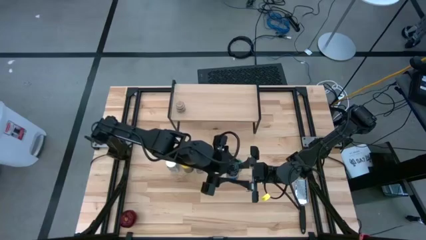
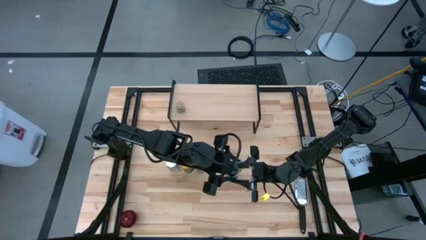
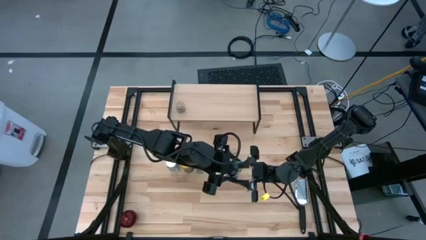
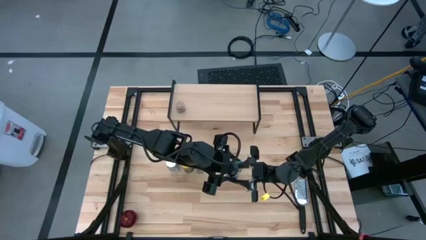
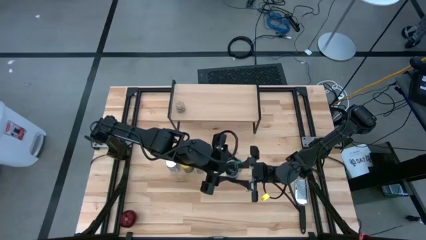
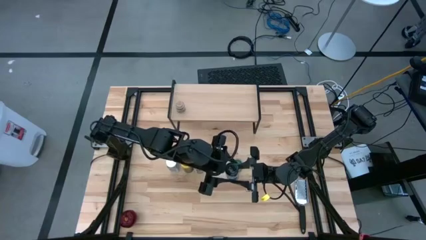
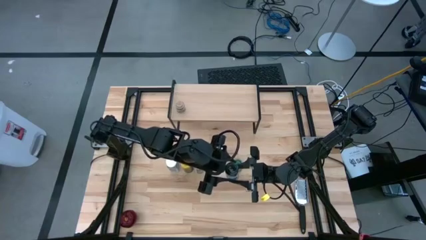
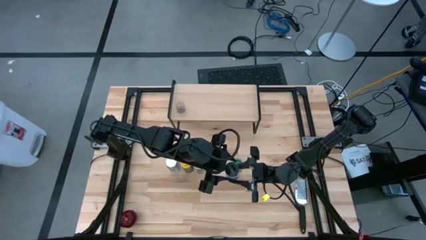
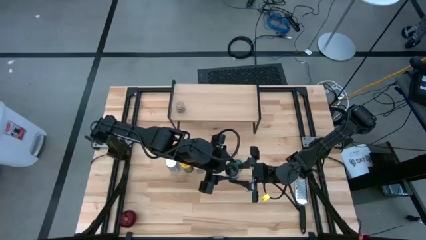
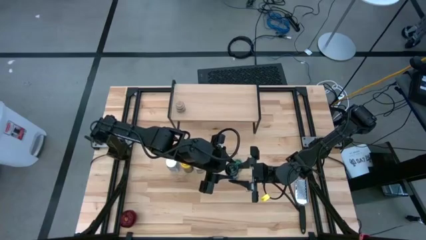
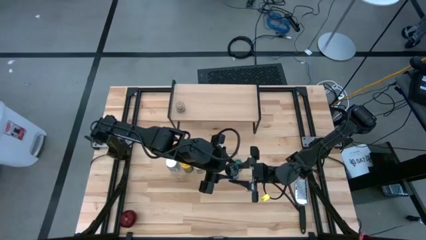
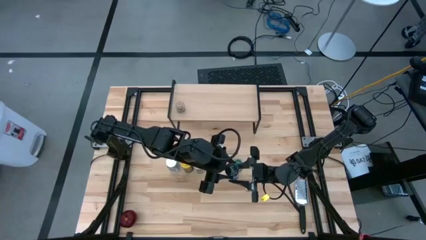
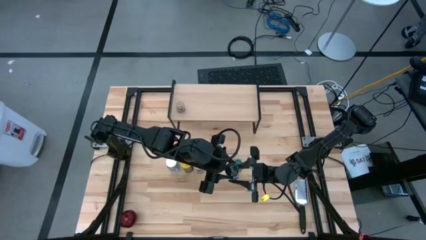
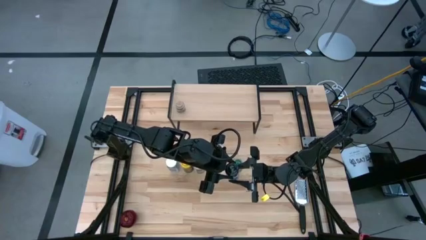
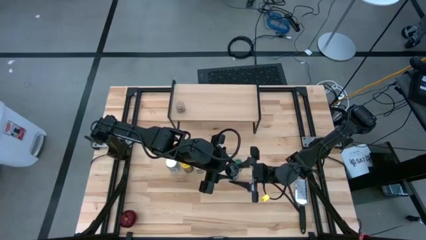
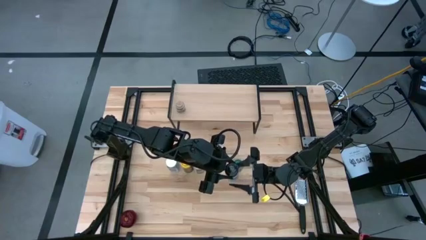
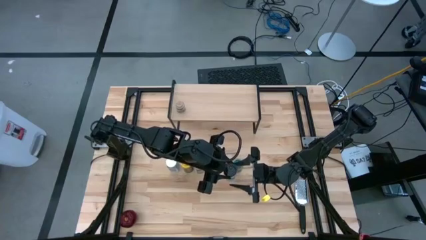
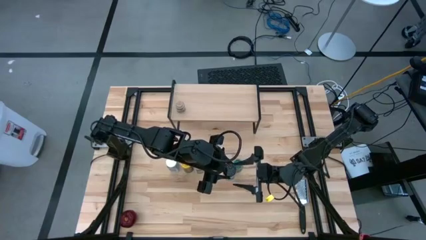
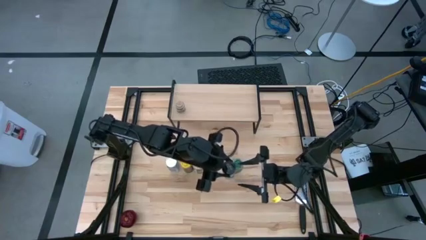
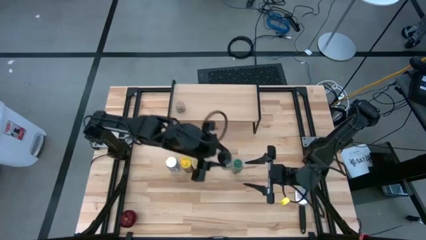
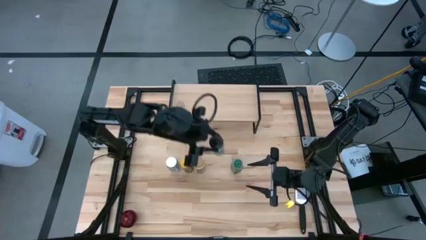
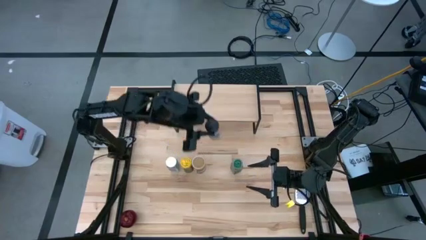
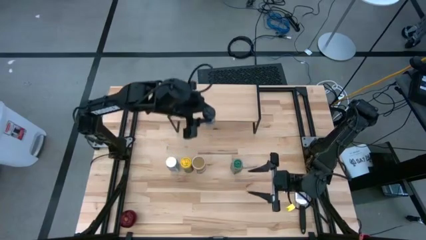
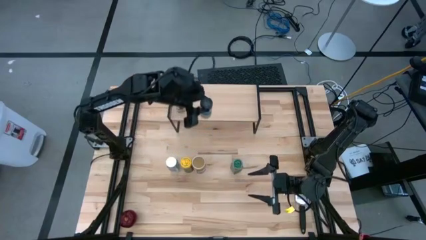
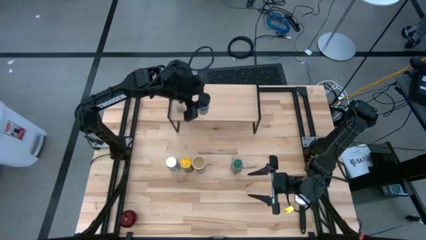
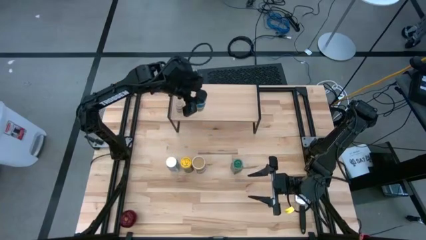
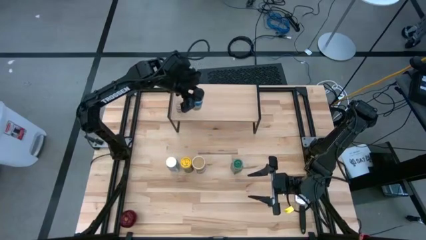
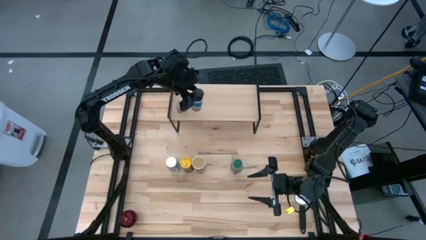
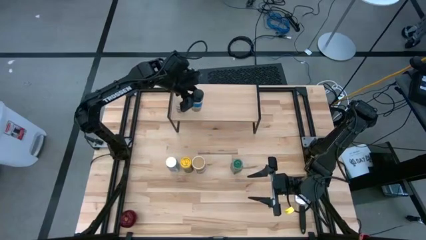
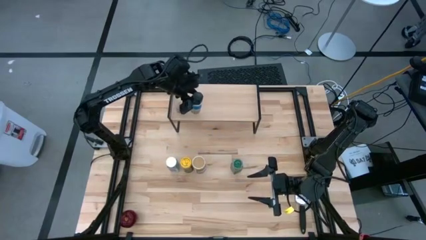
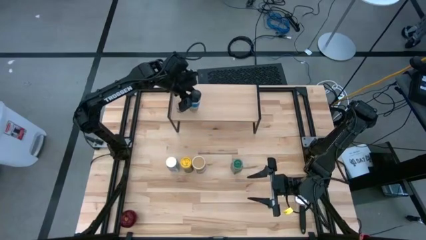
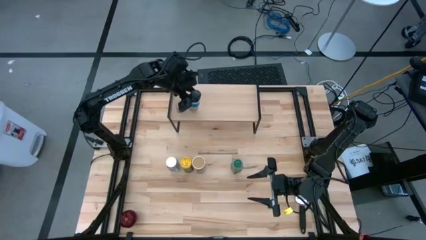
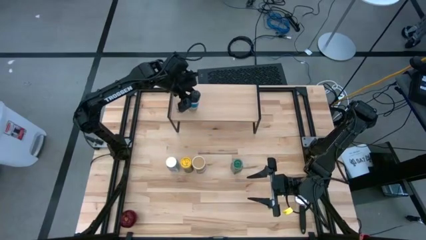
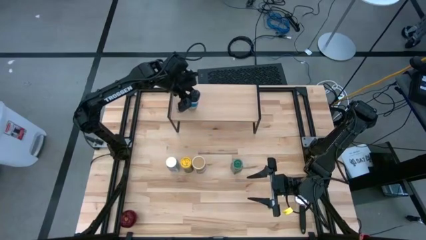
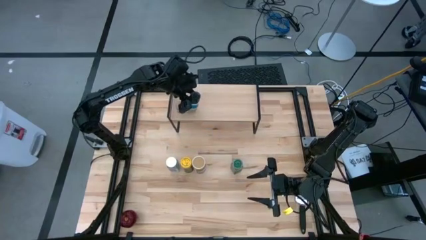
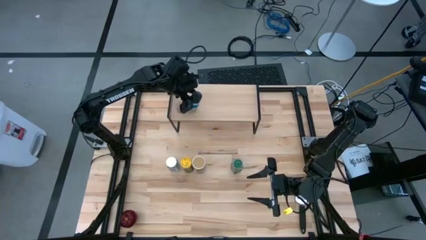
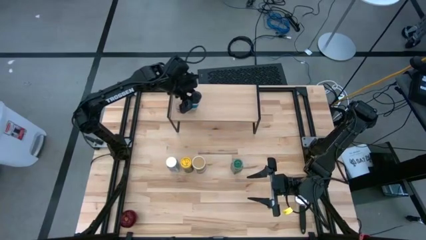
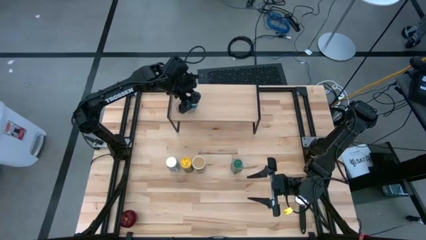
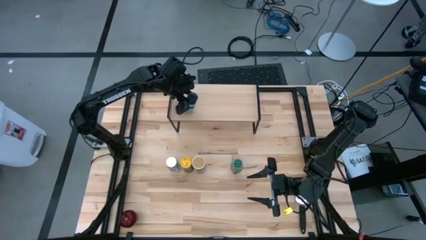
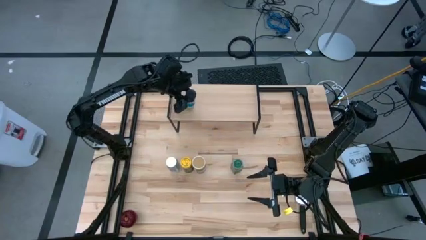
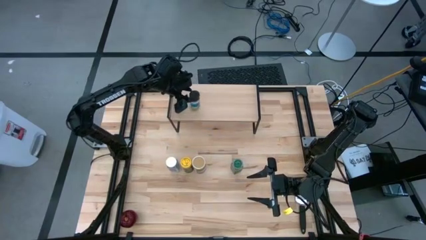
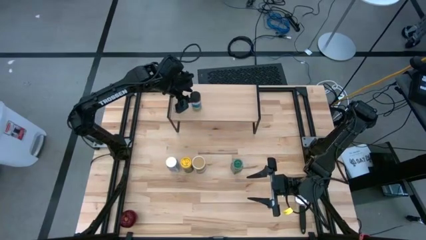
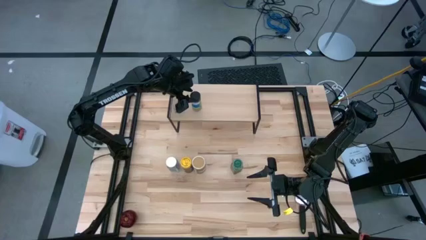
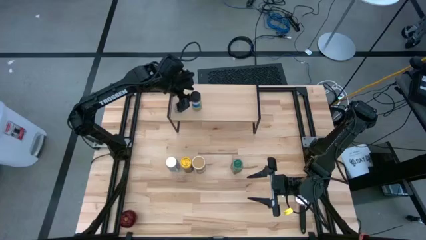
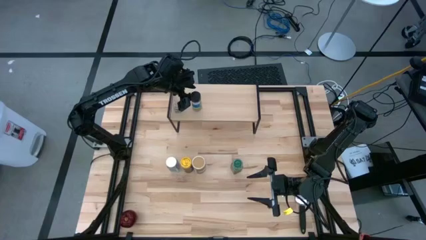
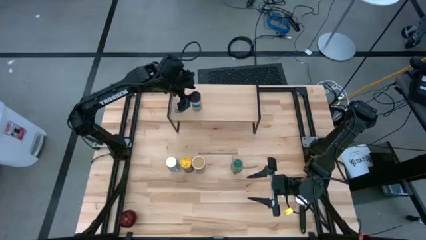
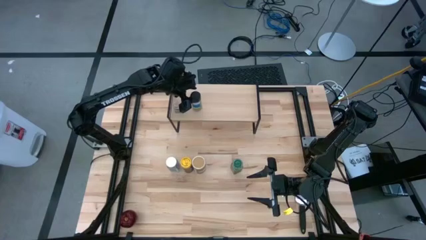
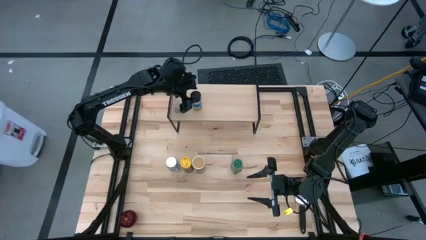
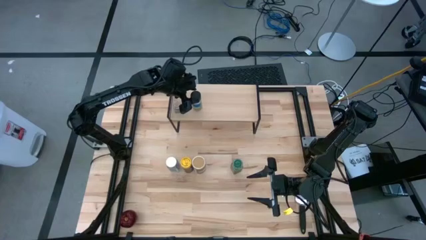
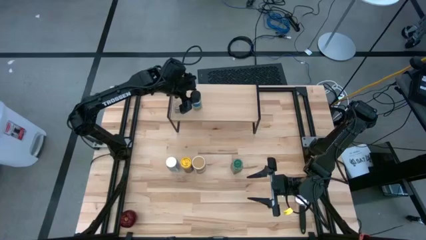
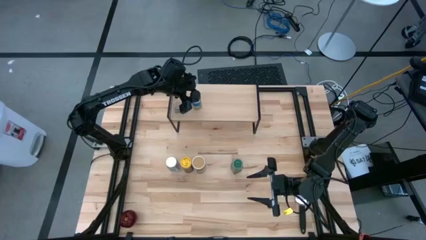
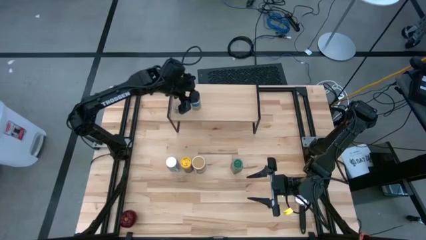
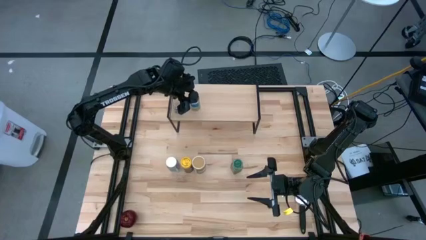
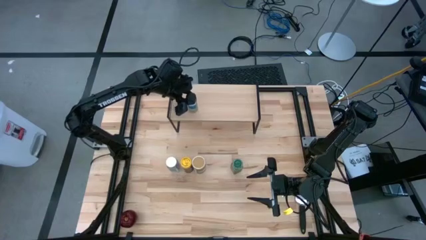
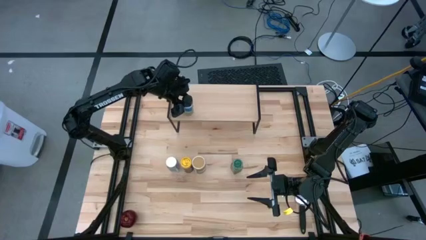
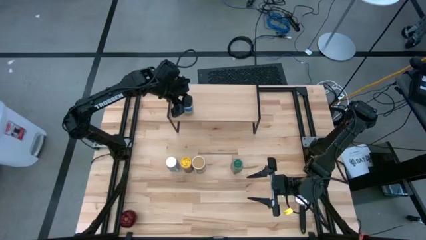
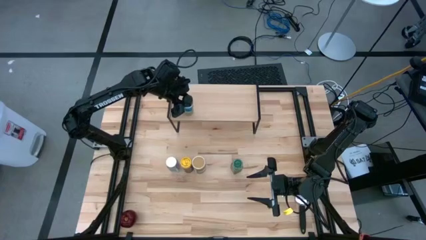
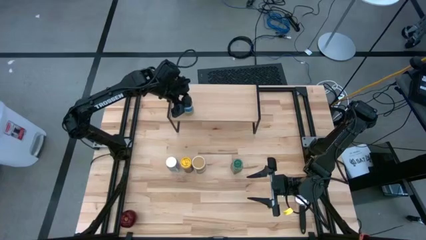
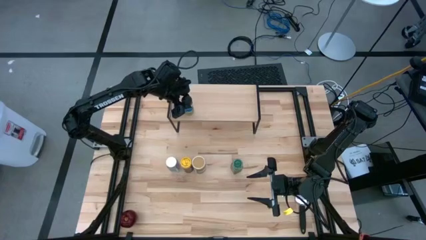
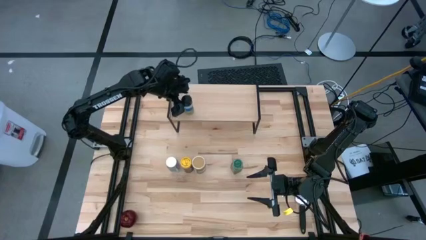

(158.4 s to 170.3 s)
Task: Shelf spices
Put the black seasoning bottle on the shelf
